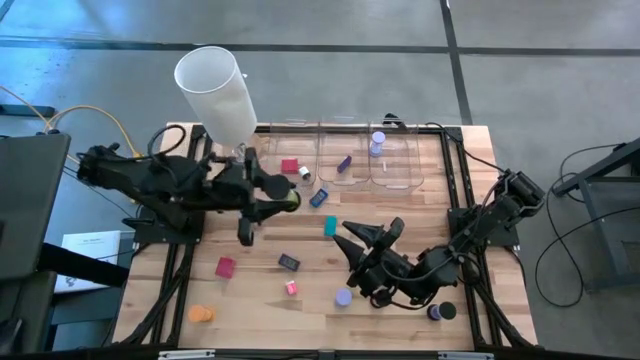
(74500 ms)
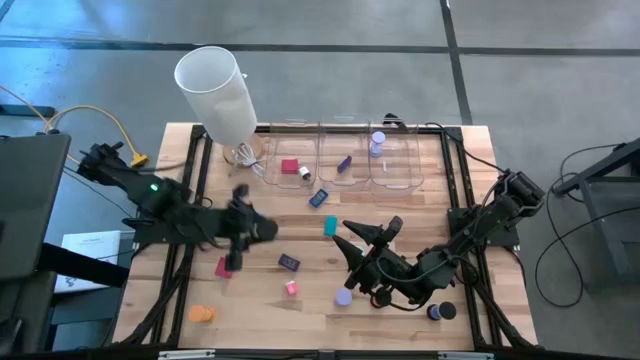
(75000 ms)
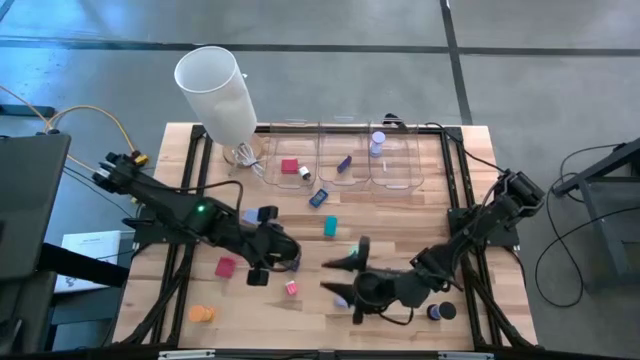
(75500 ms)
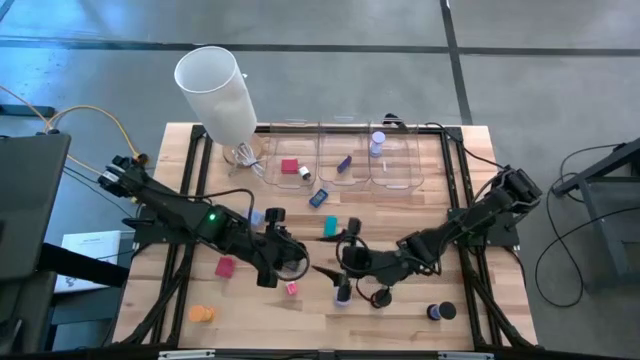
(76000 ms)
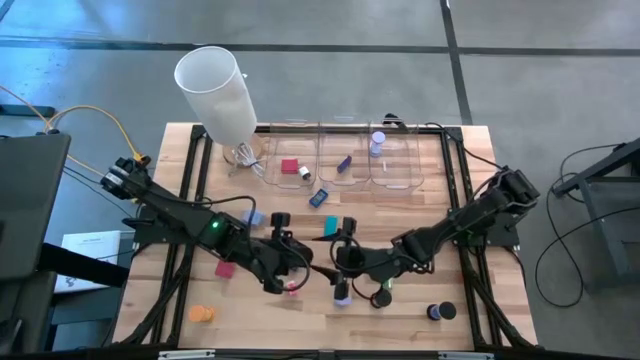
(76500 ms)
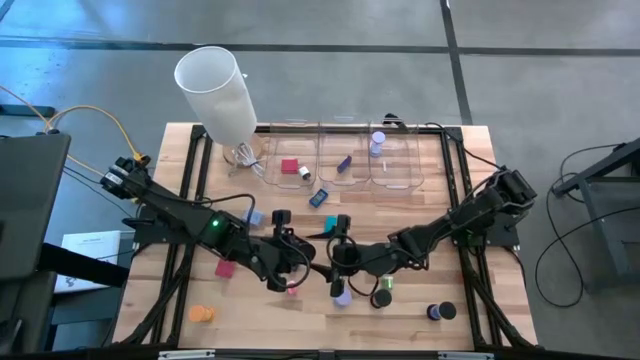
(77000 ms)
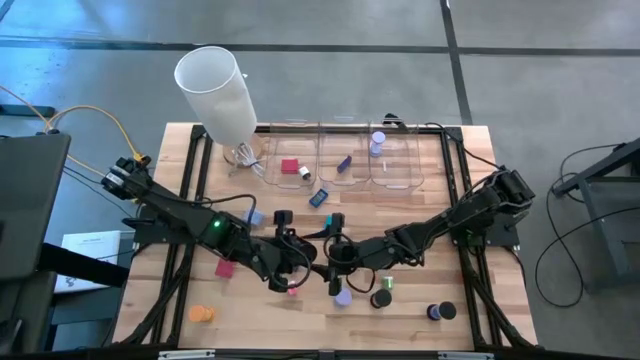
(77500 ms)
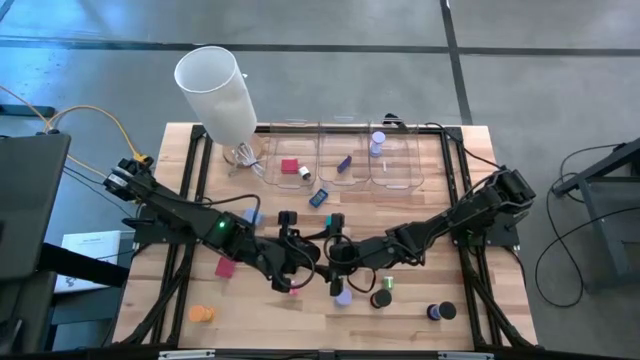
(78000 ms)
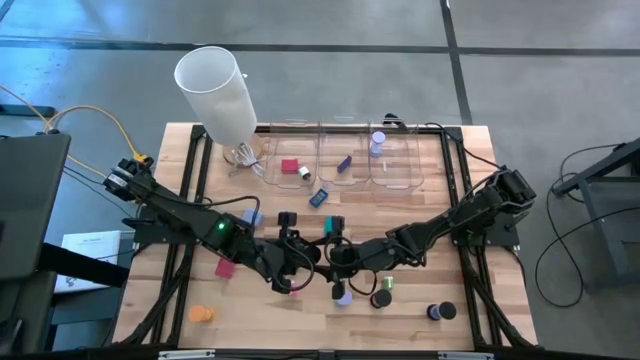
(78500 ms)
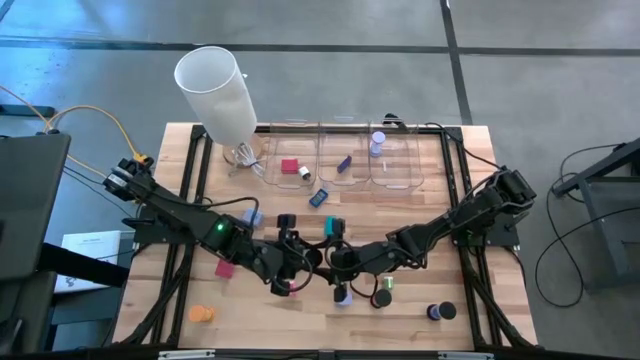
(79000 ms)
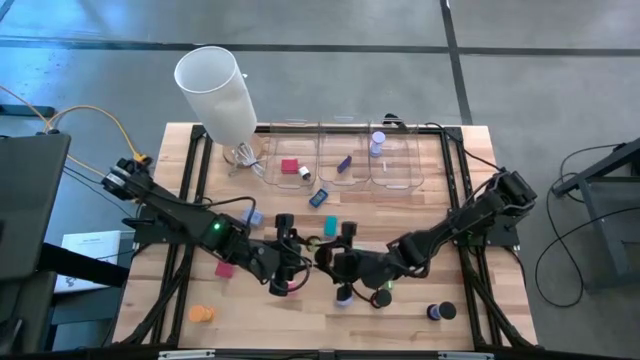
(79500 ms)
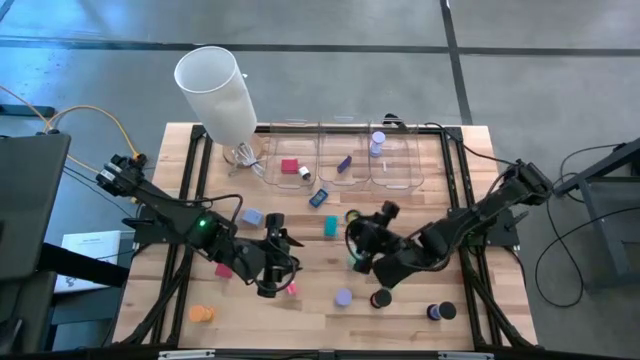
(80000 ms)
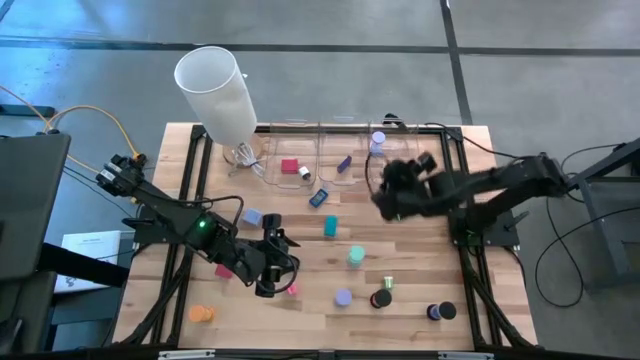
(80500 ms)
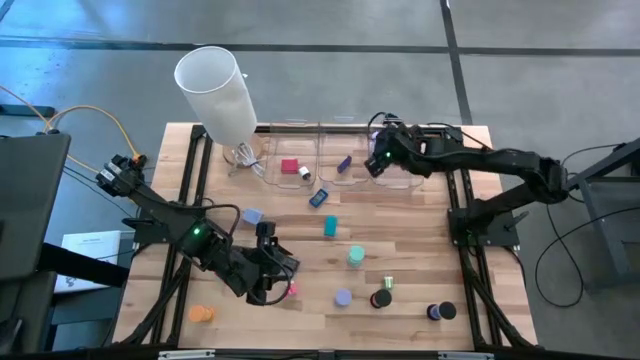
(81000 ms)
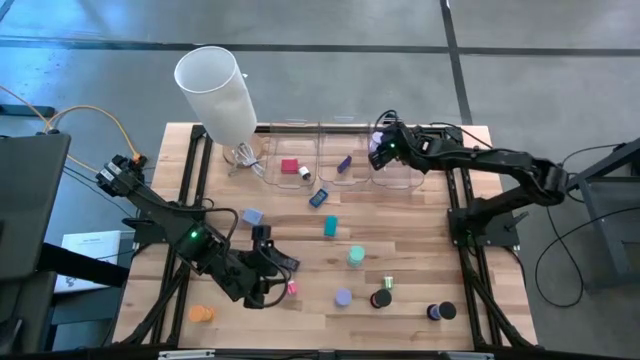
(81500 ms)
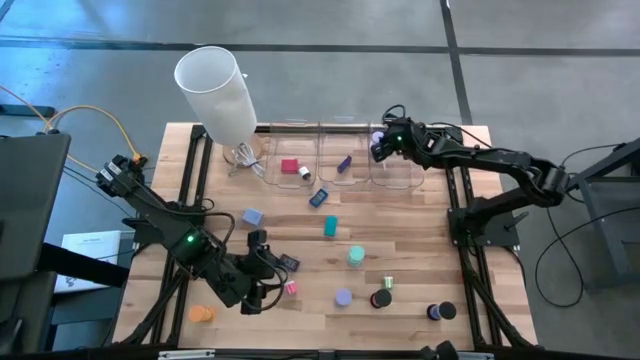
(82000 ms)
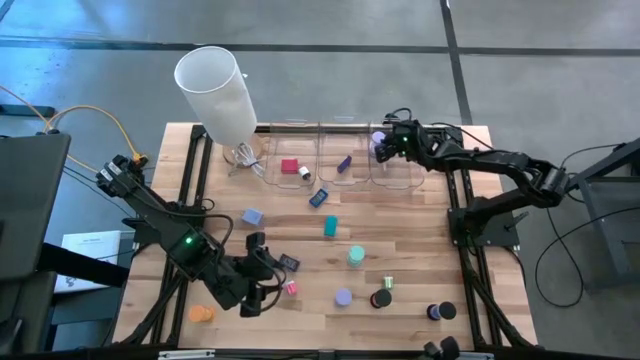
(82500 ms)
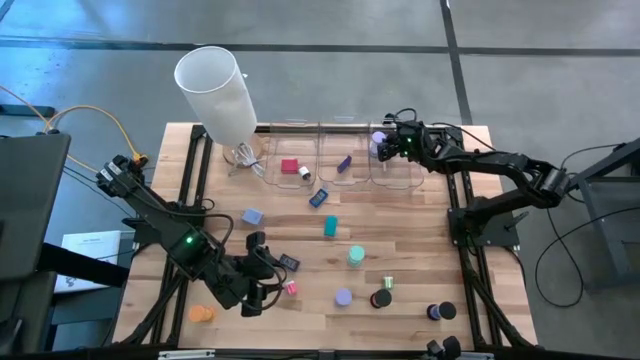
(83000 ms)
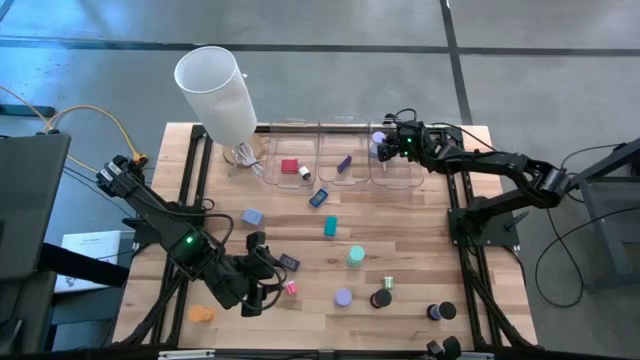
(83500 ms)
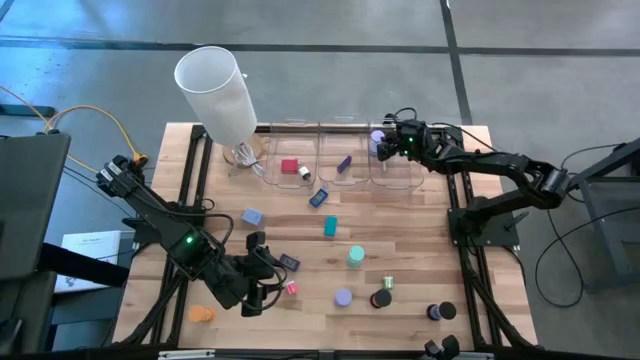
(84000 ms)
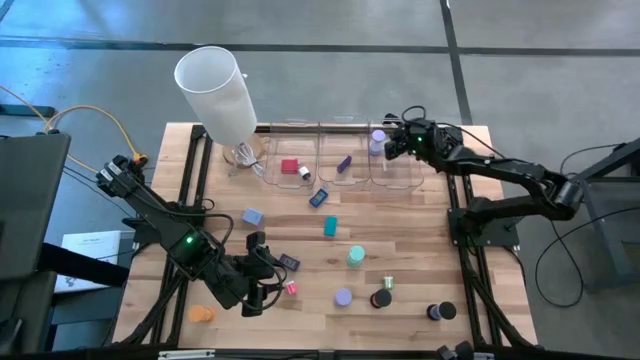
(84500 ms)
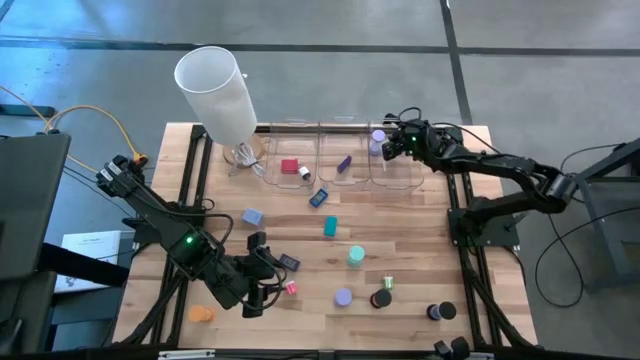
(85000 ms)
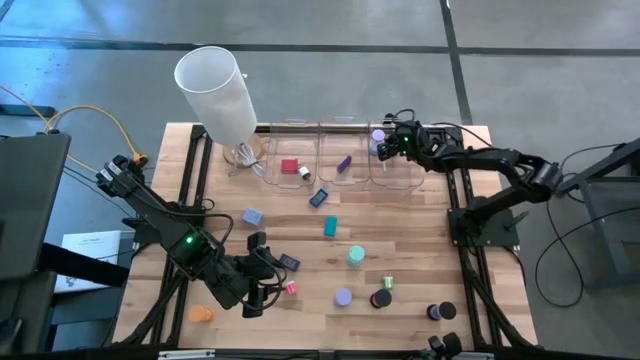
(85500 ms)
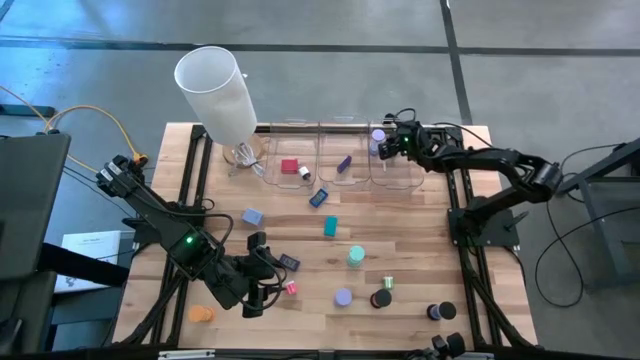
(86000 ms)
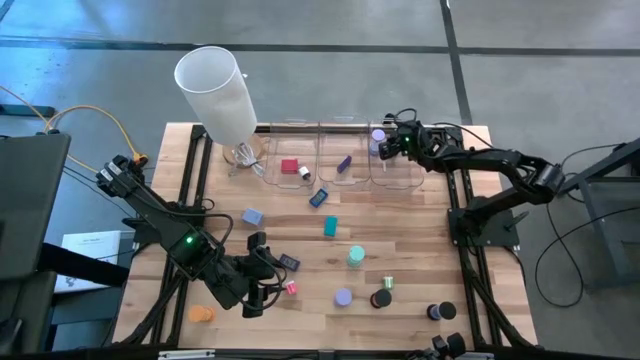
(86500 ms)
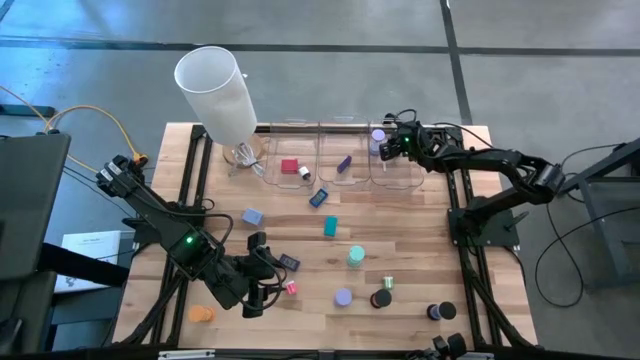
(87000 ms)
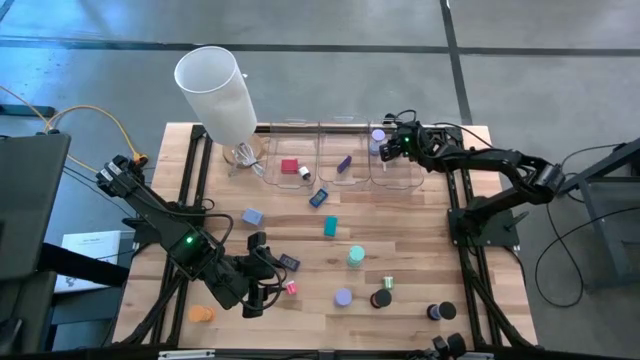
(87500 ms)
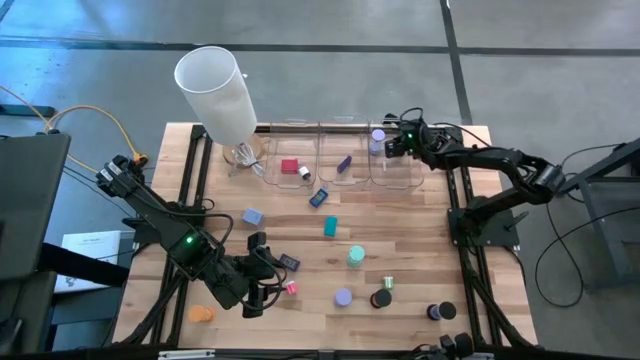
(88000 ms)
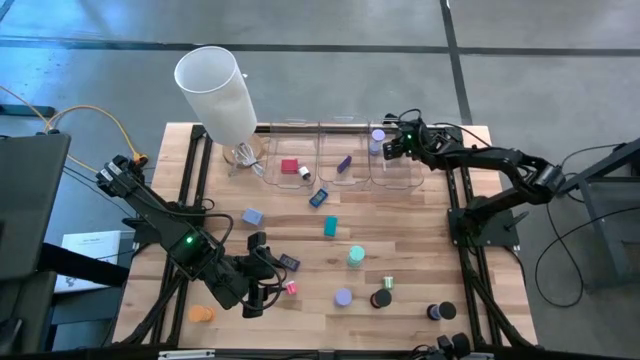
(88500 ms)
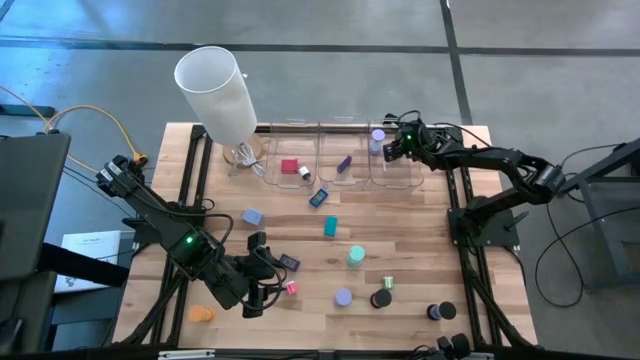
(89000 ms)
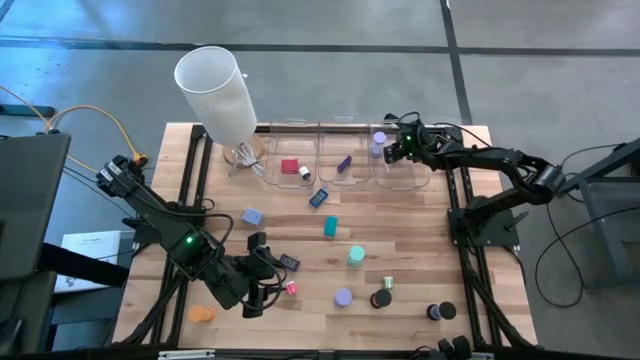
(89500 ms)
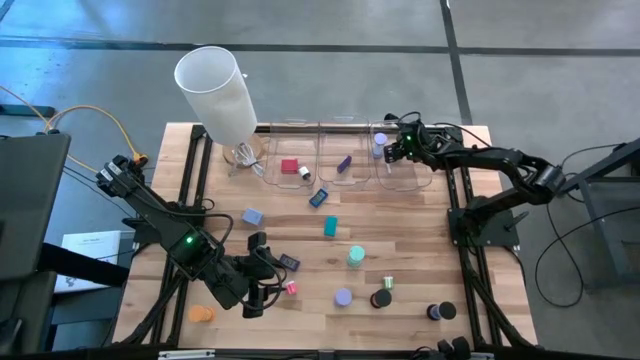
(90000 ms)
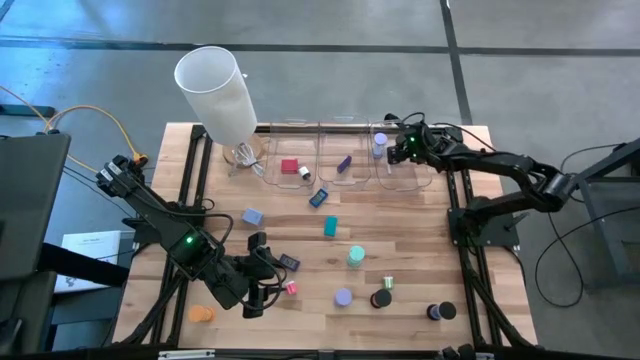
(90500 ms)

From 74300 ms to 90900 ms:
Task: Pick & Place Office items
Put the light green hourglass into the right transparent bin

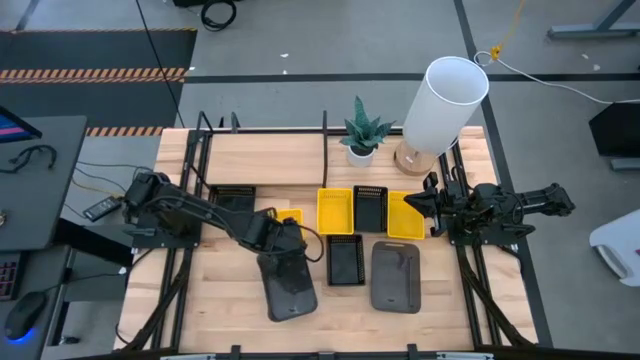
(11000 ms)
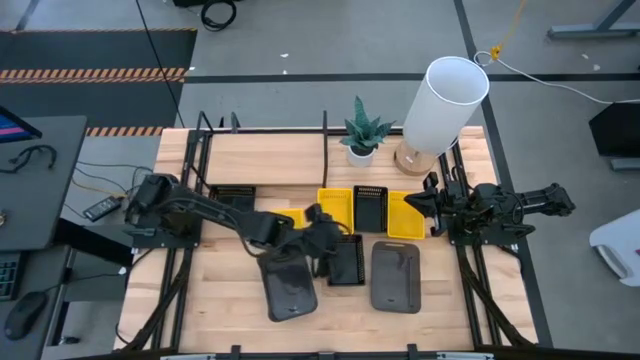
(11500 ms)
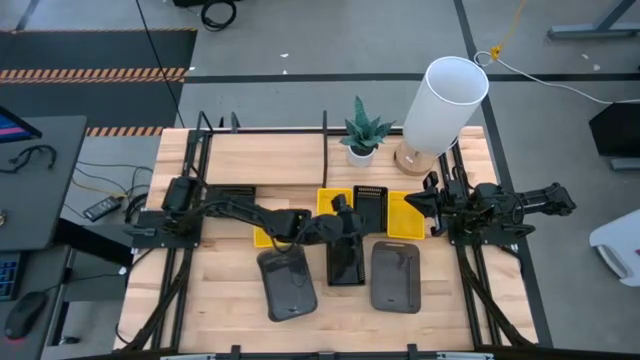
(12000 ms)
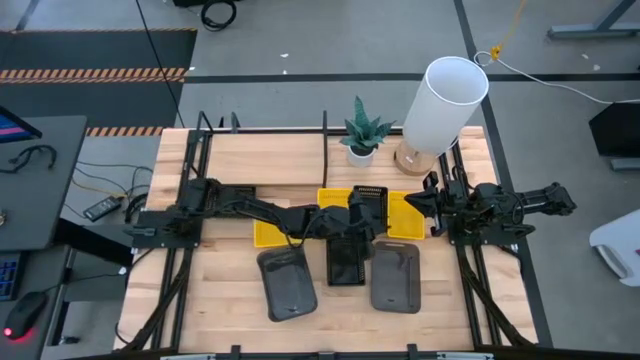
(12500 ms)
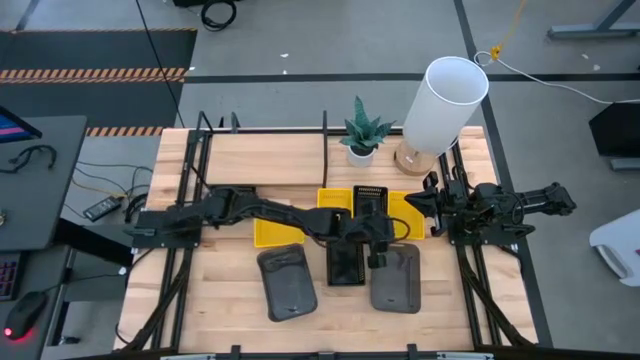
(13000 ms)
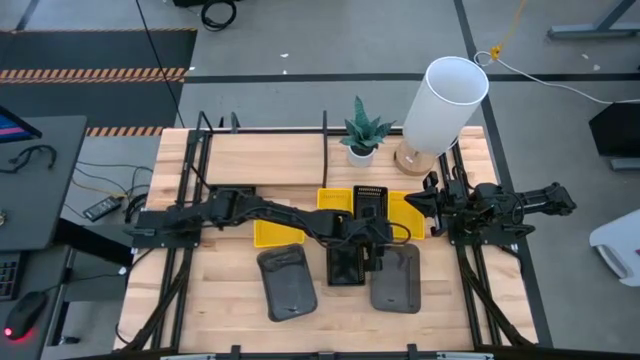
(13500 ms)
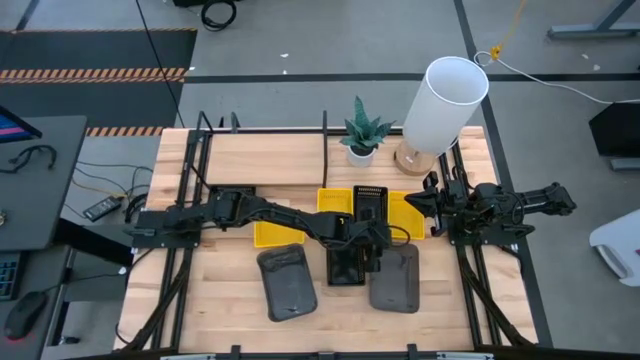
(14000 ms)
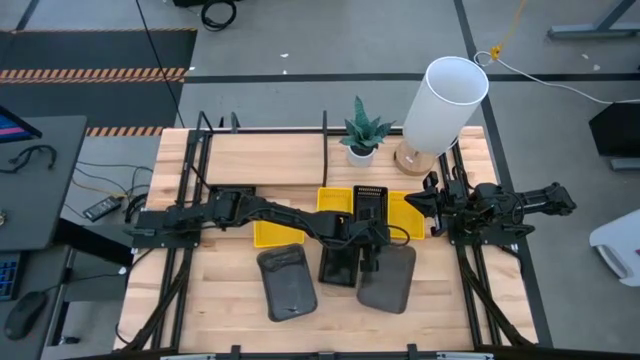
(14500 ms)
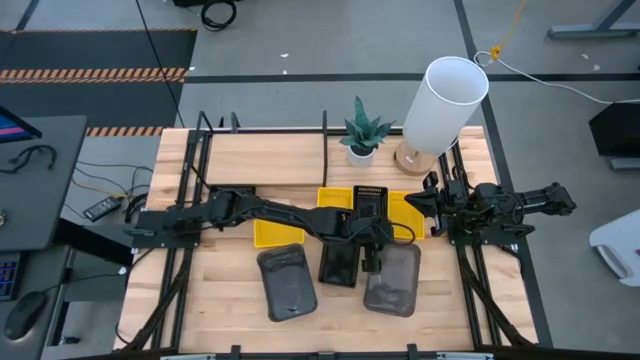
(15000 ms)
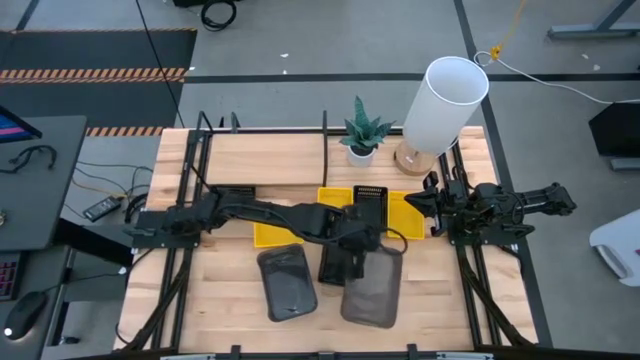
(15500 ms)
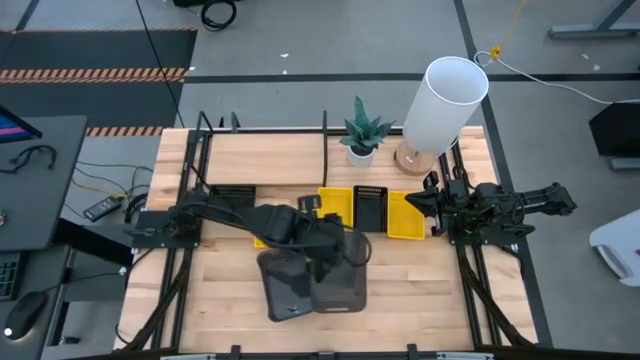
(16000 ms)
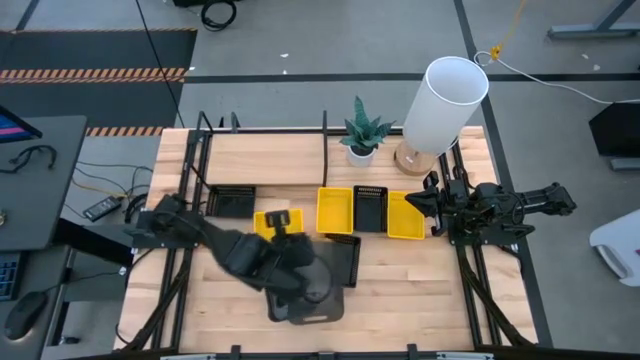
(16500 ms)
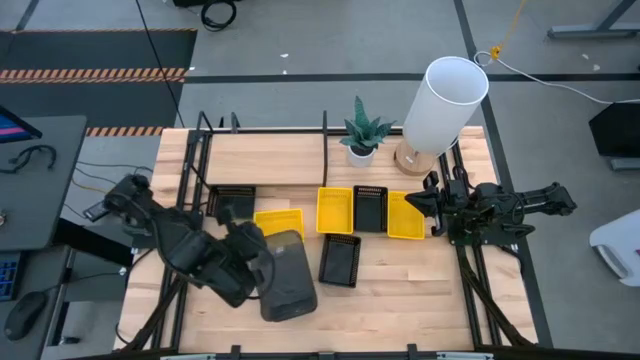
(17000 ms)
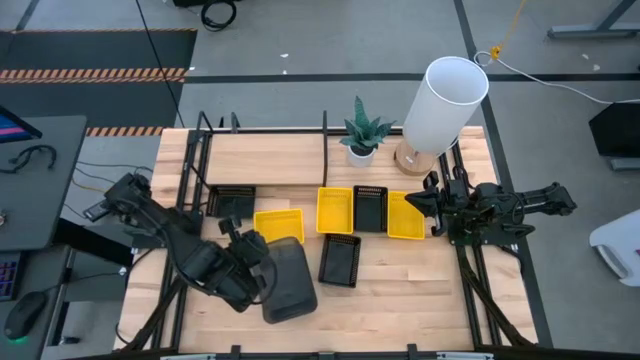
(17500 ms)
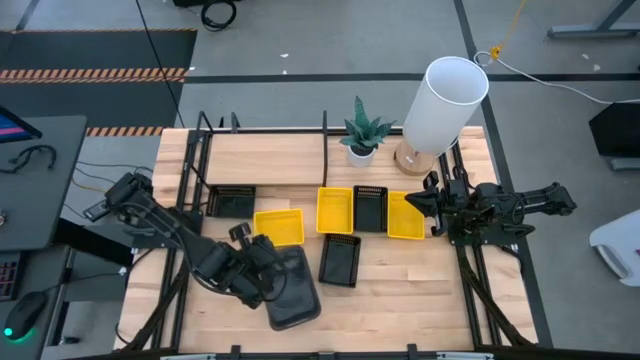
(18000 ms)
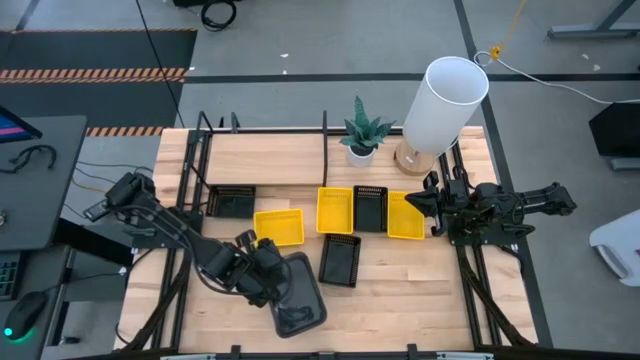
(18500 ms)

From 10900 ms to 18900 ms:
Task: Stack baskets on shelf by color
Stack the transparent black bin on the transparent black bins
